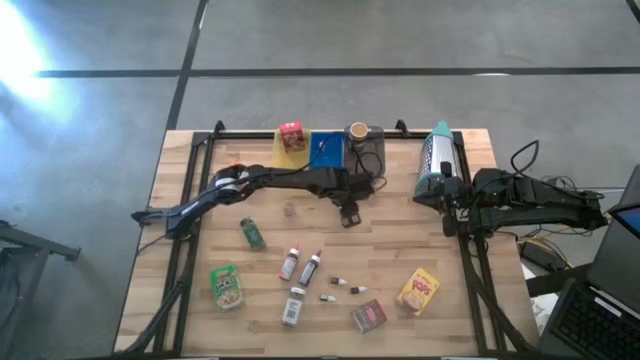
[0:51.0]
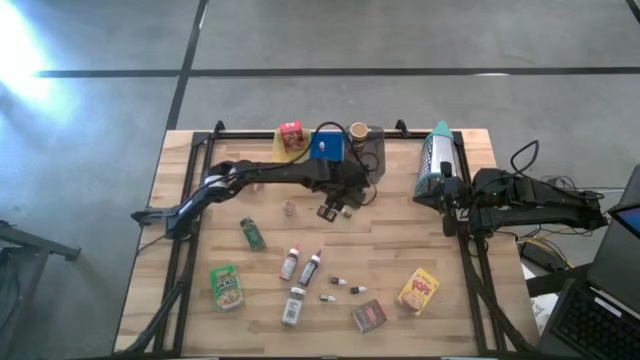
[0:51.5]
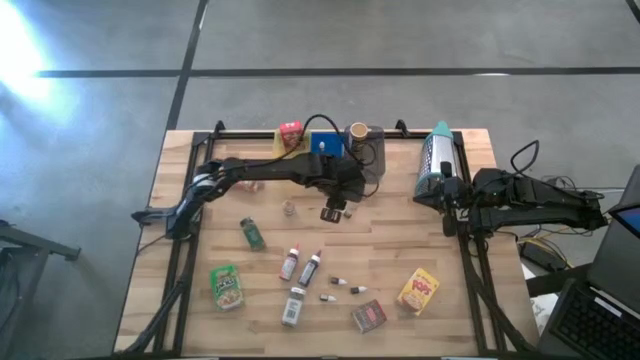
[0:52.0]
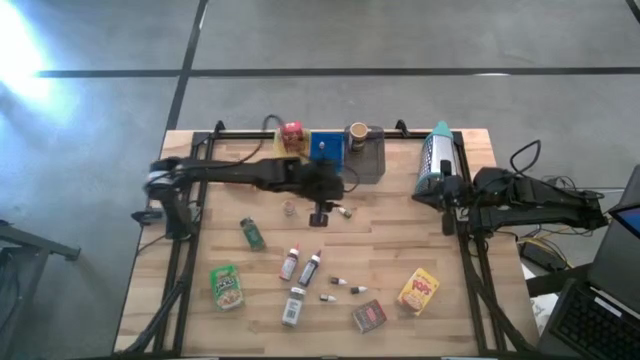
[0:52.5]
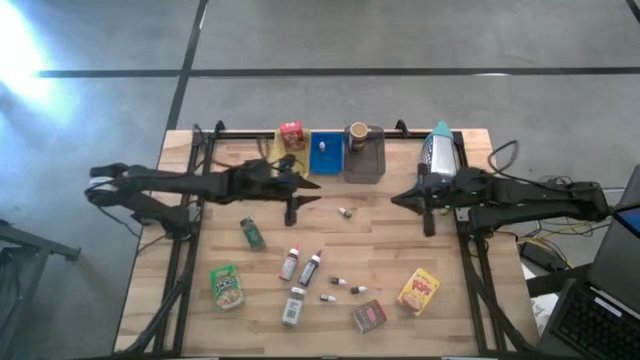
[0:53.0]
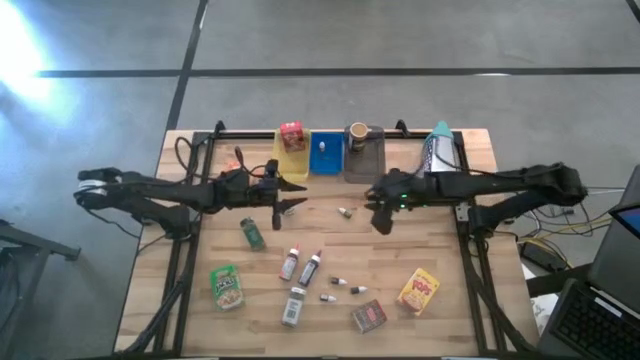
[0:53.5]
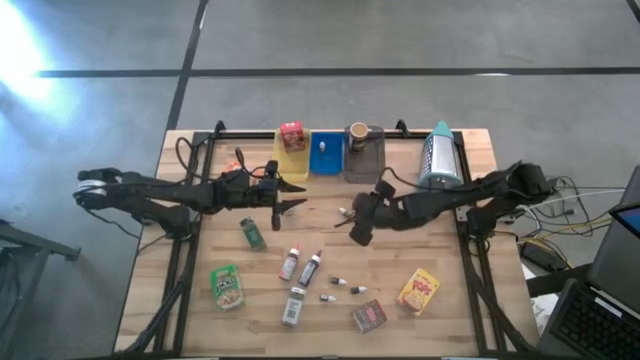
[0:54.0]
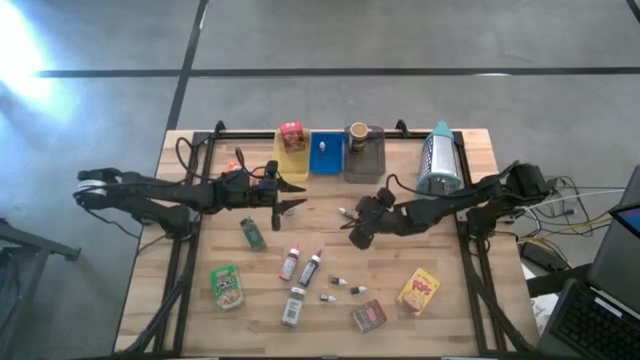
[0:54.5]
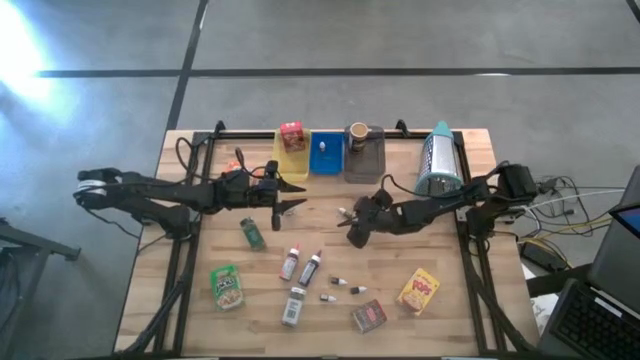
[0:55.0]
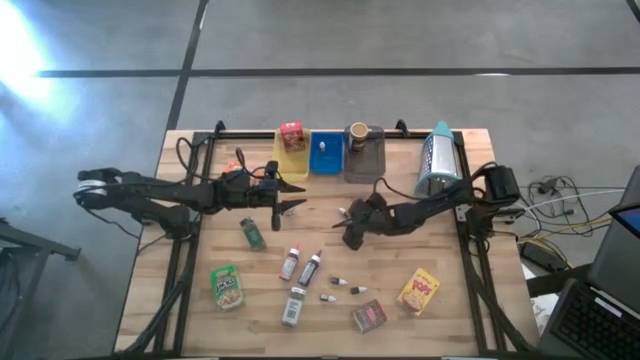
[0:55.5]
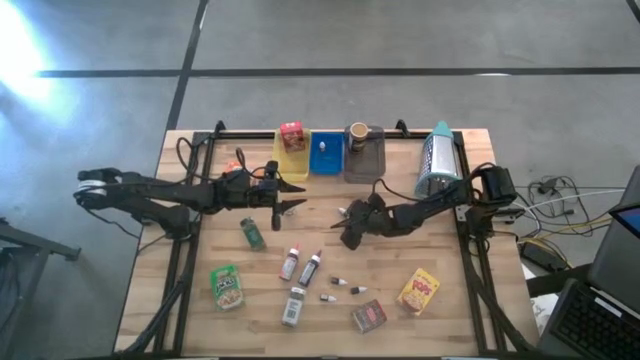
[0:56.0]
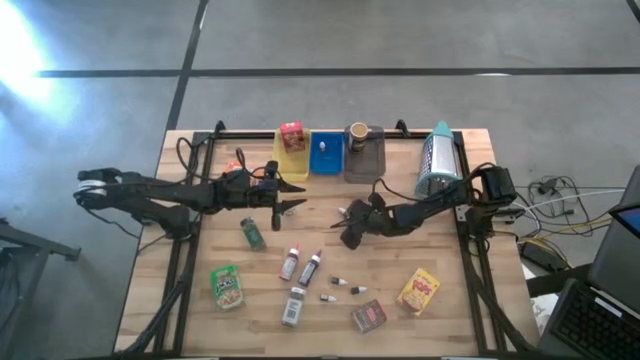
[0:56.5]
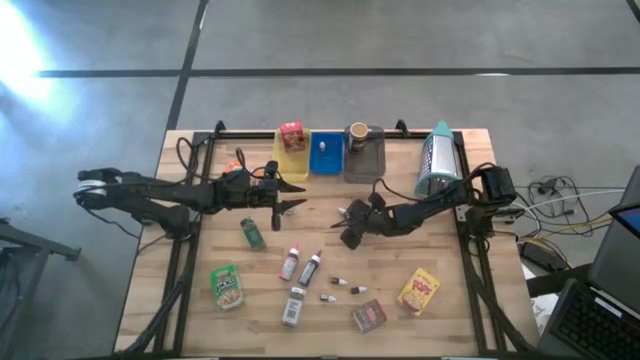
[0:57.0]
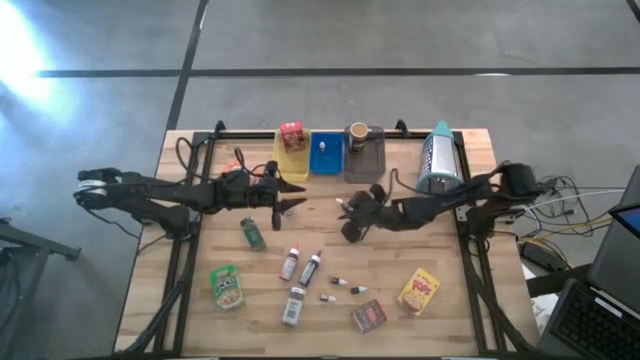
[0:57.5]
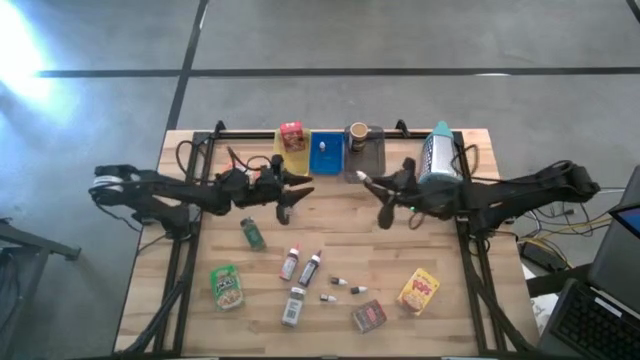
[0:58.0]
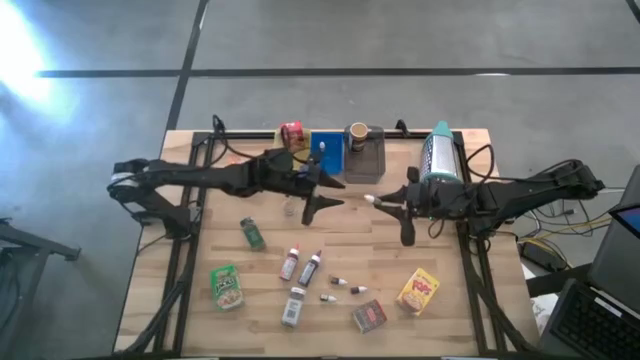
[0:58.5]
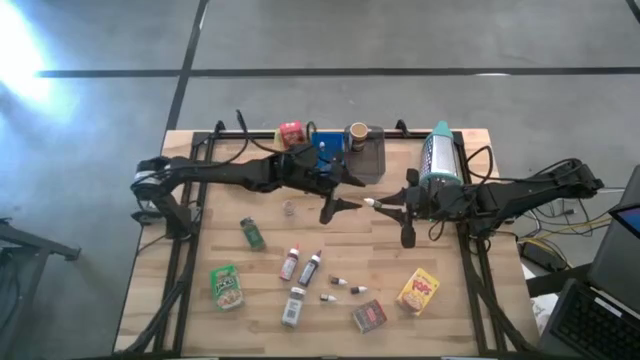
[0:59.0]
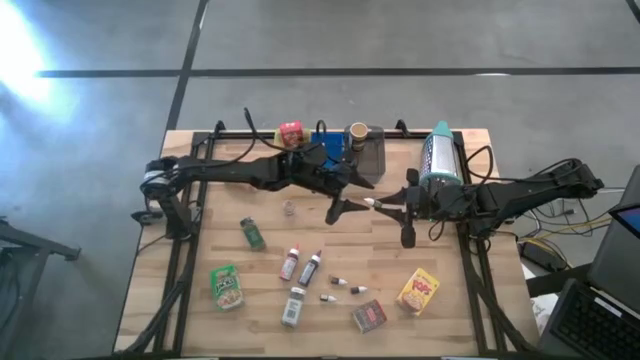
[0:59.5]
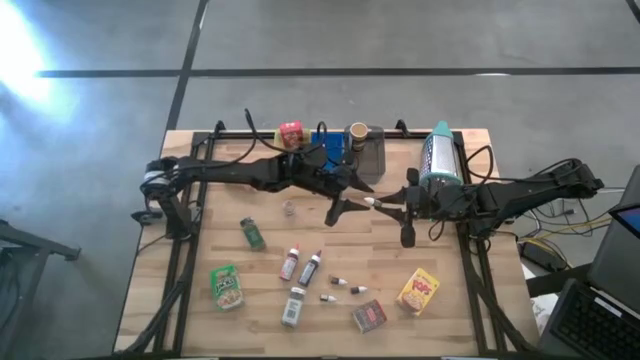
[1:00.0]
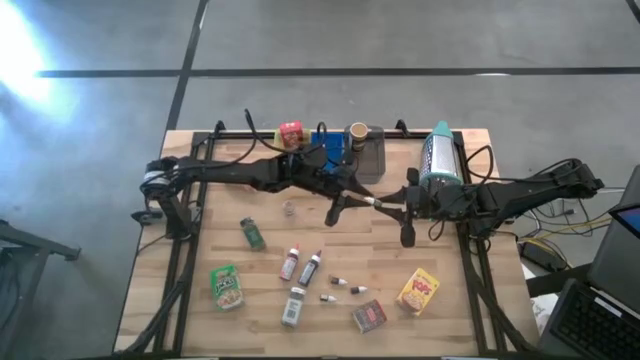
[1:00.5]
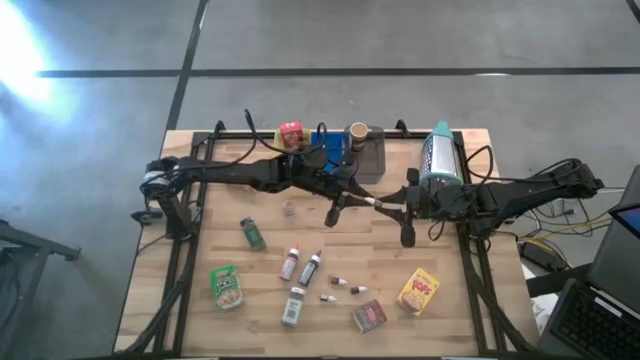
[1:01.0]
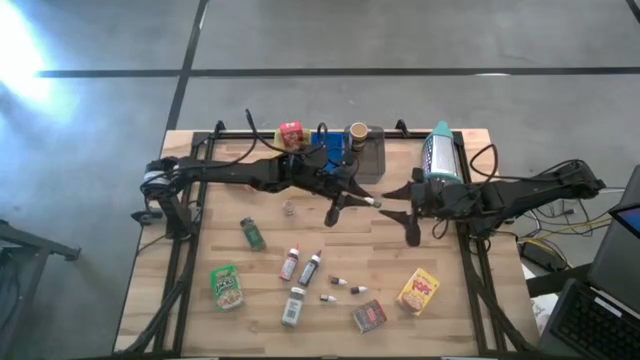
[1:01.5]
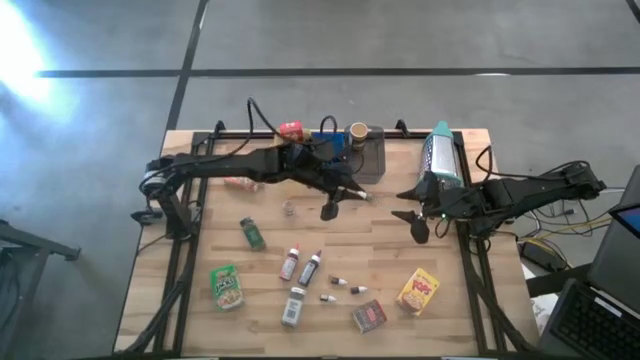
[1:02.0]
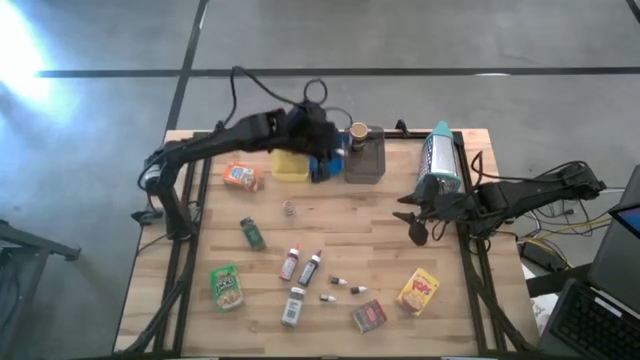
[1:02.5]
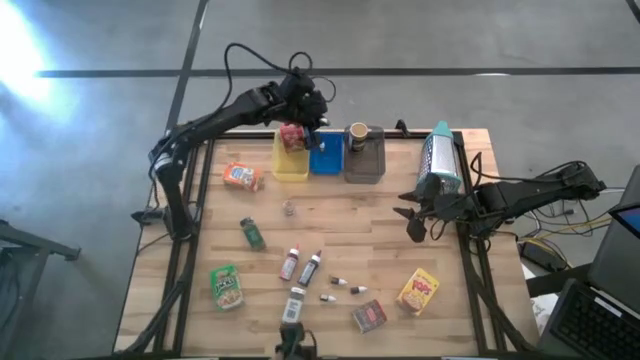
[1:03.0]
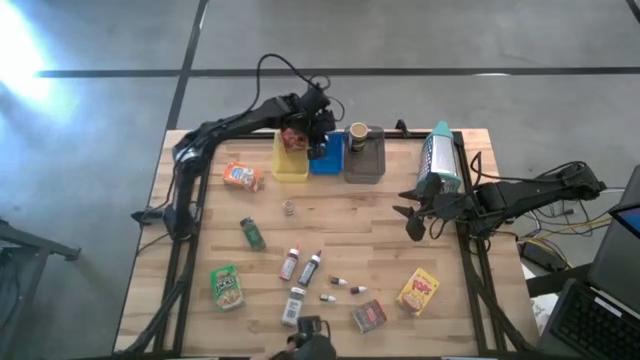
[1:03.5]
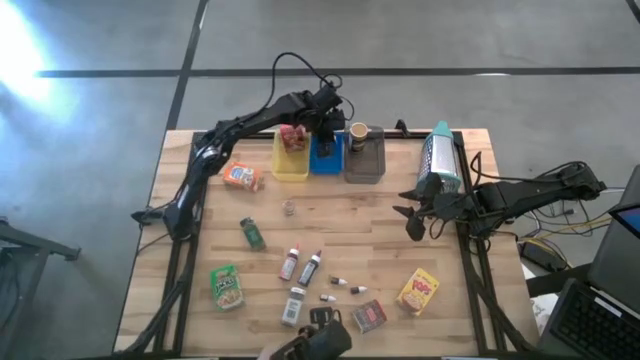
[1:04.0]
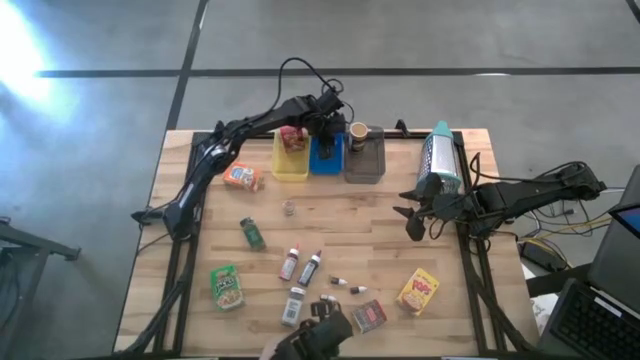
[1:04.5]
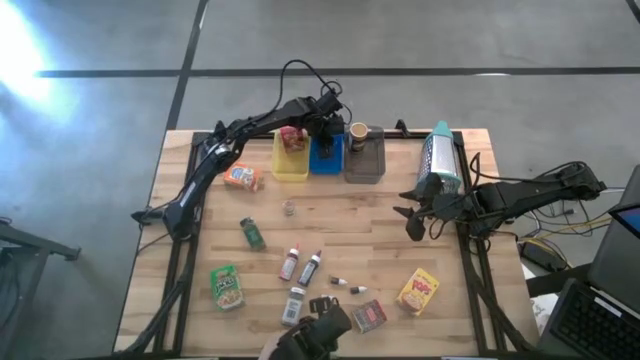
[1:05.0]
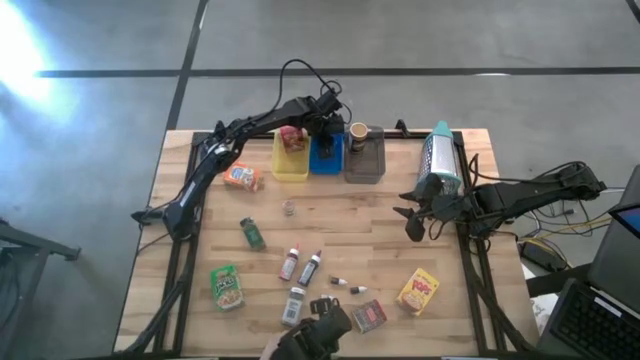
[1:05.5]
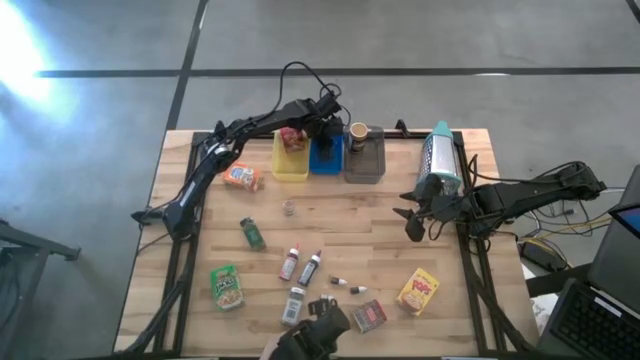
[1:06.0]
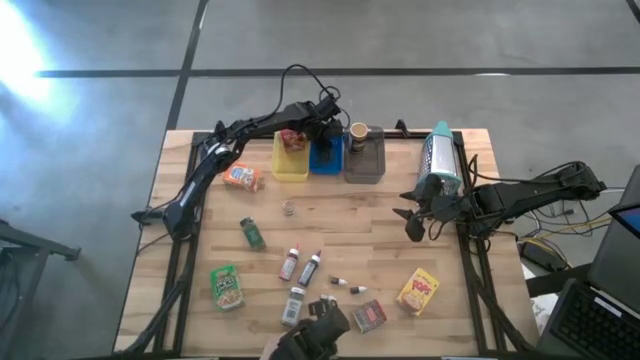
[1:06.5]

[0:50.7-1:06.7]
Task: Pick & Place Kitchen Items
Put the small green food coloring bottle into the blue bin

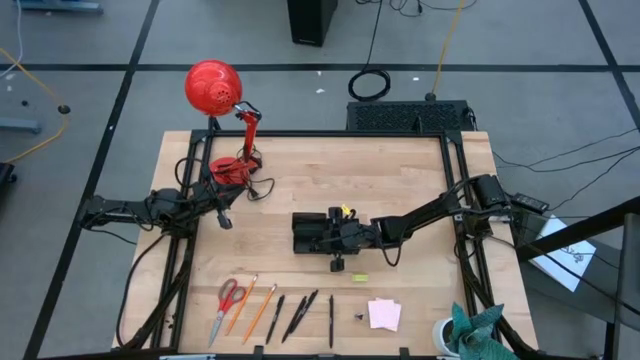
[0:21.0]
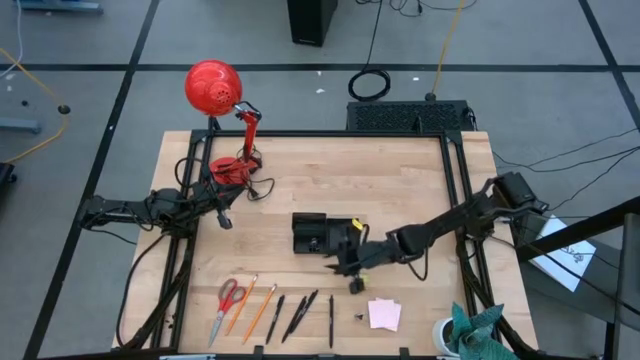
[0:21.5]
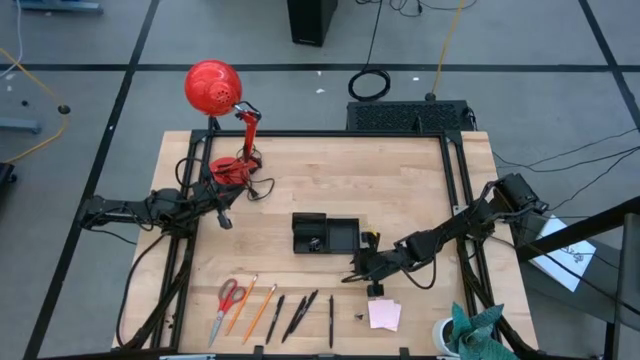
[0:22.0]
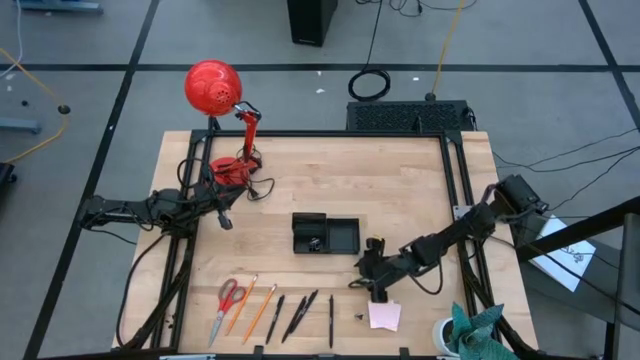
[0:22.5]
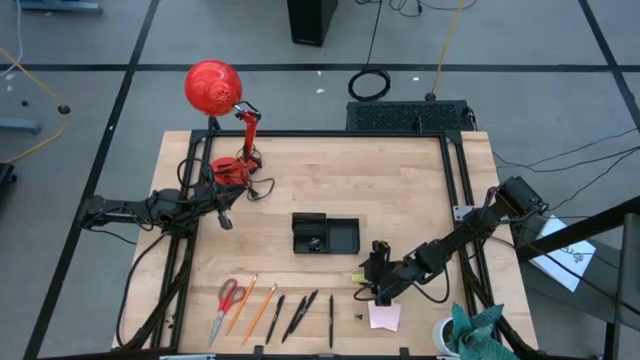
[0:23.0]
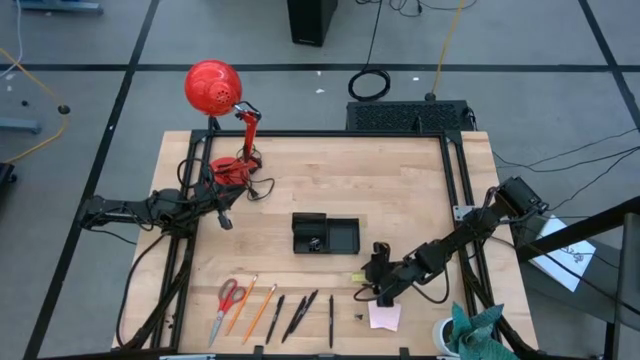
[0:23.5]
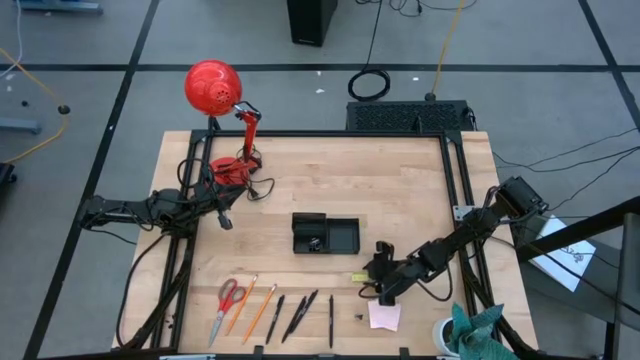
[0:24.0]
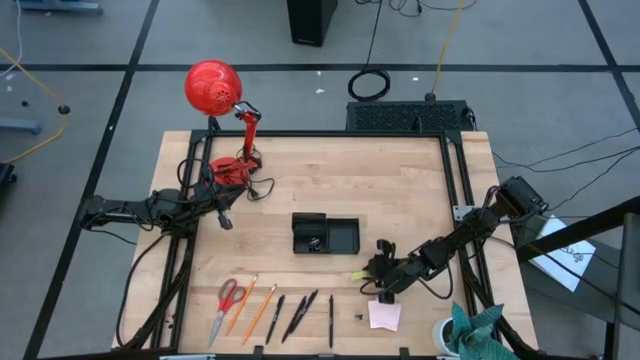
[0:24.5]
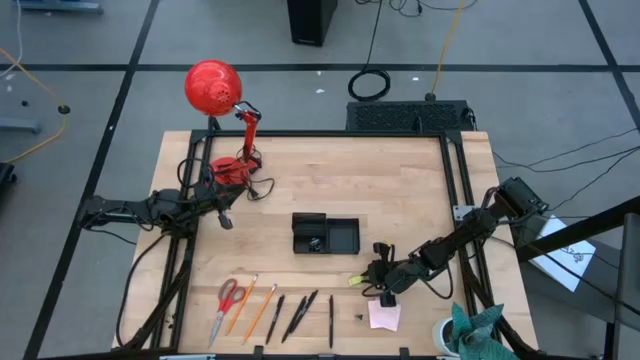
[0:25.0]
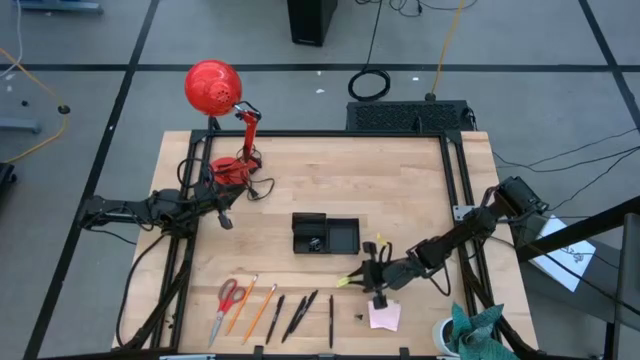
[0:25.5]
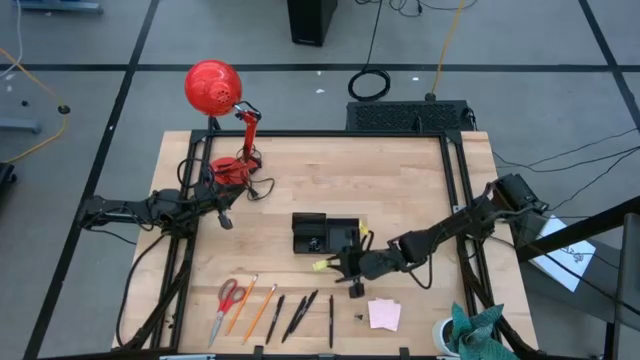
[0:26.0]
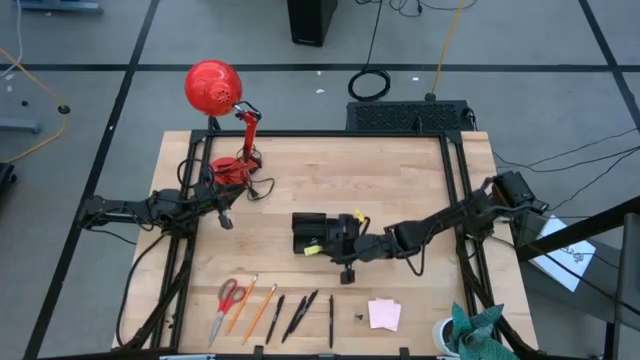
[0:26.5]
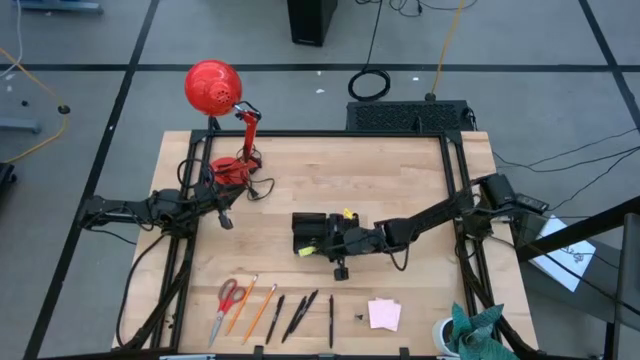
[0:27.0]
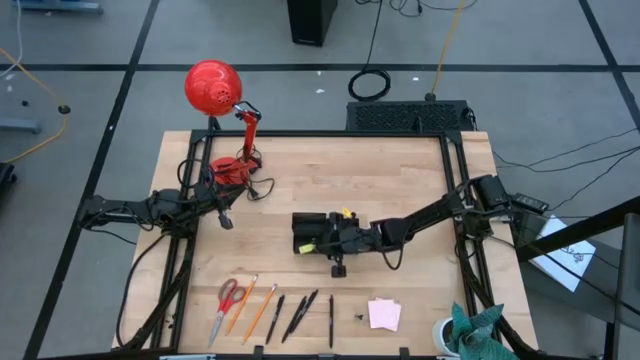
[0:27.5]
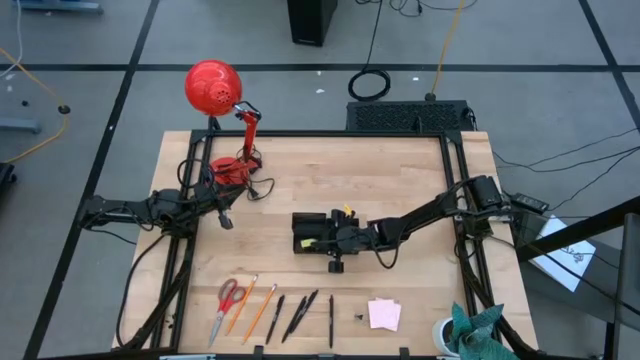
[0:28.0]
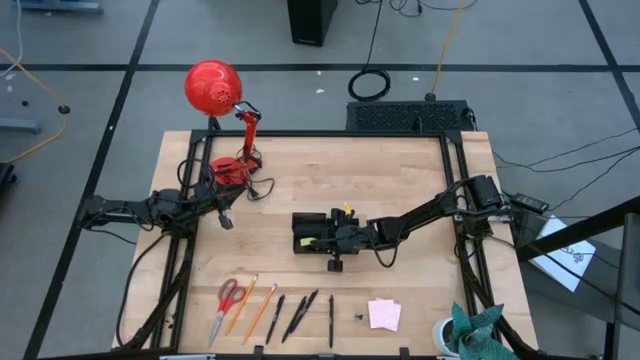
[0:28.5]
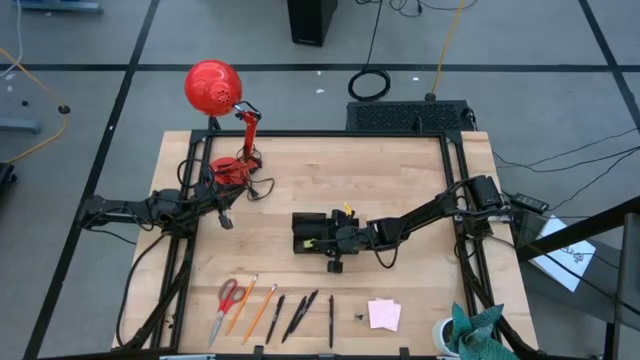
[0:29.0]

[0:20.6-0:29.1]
Task: Pick and place office supplies into organizer
Put the eraser into the desk organizer
